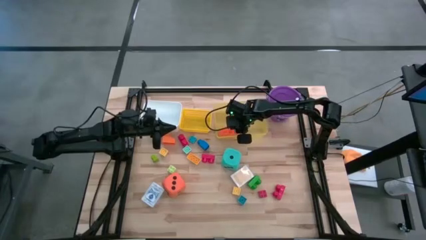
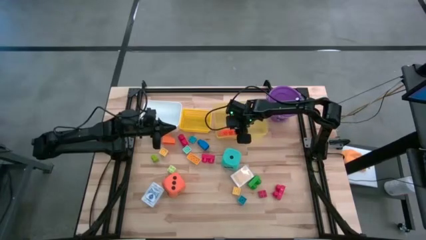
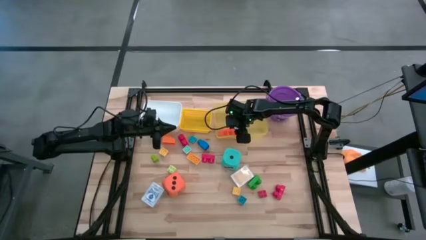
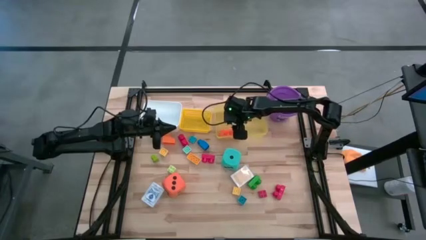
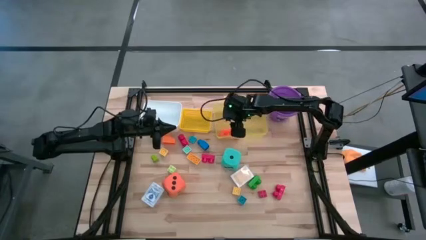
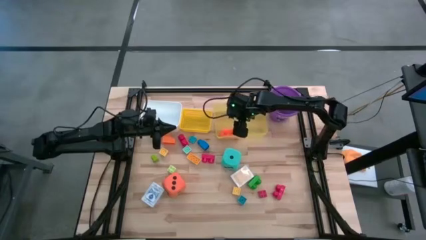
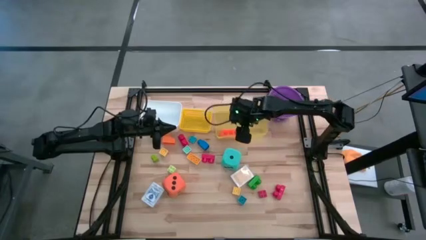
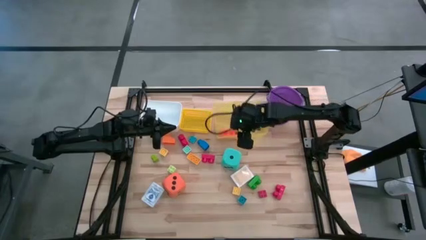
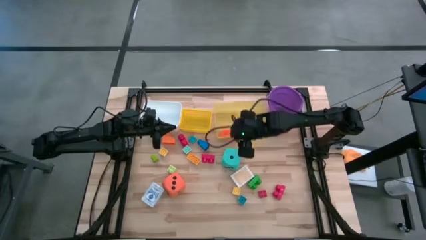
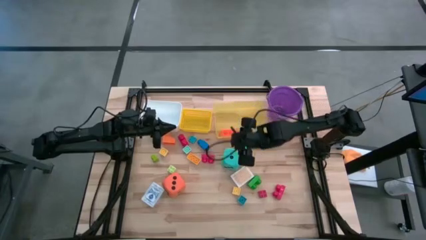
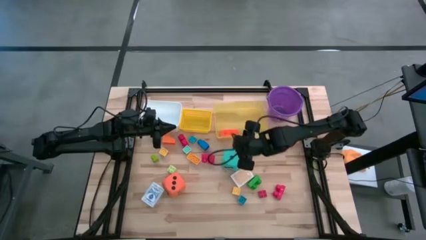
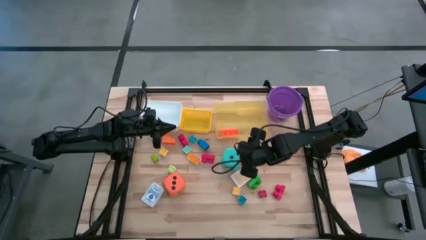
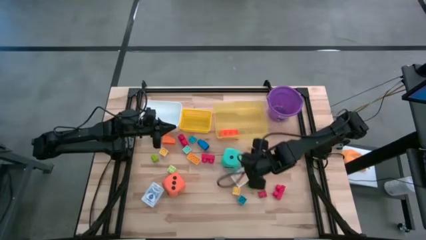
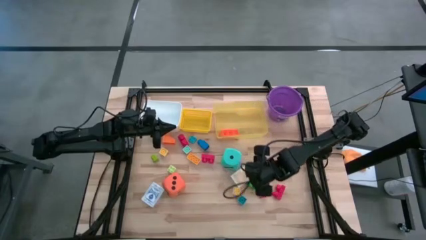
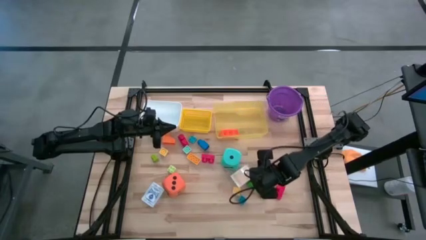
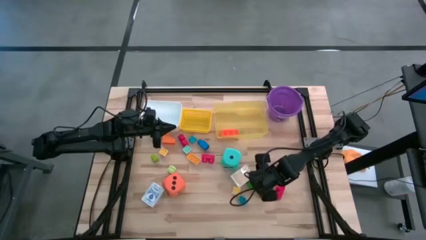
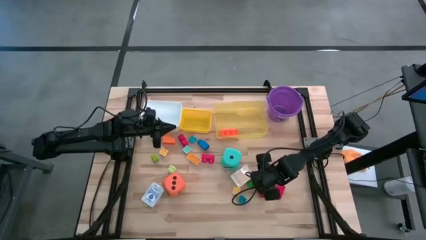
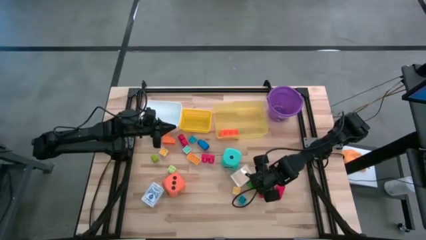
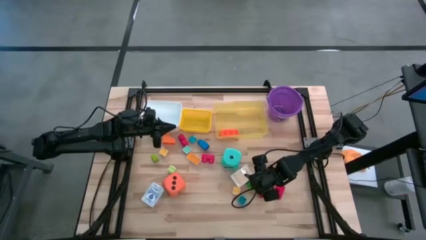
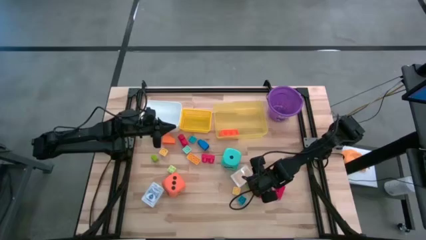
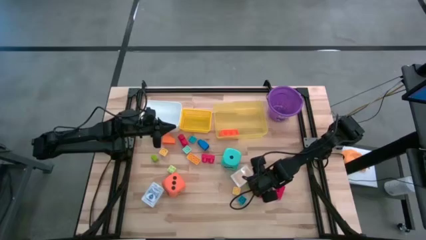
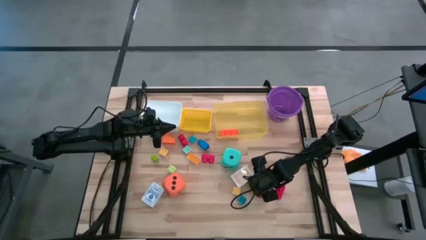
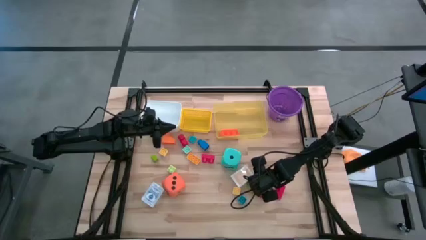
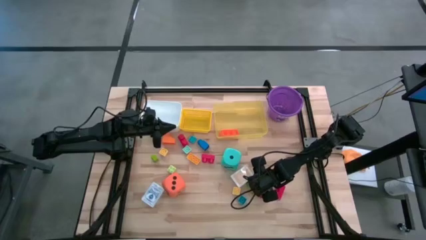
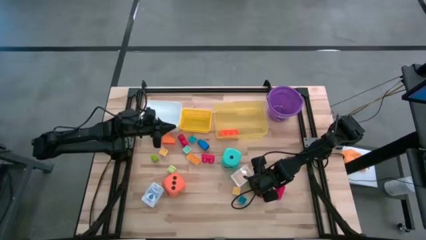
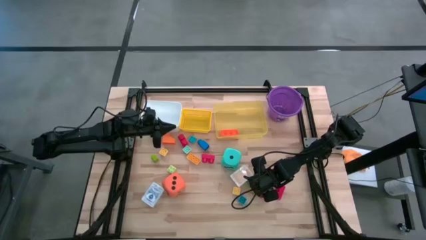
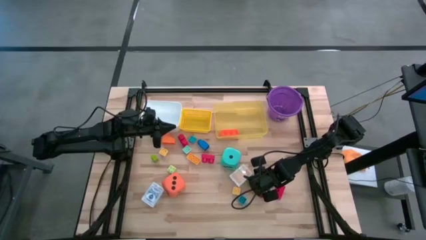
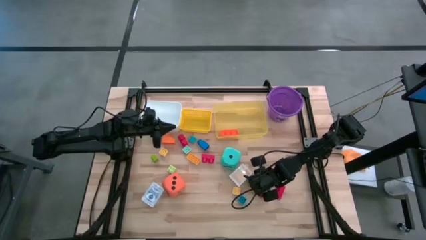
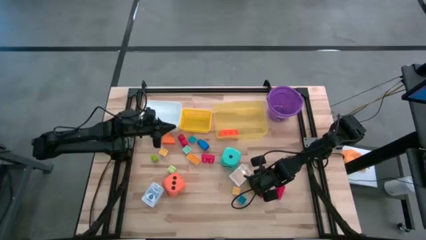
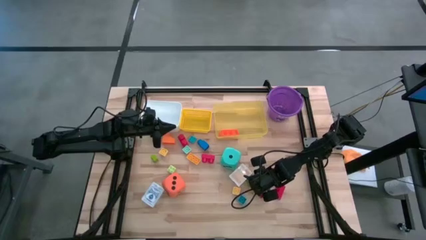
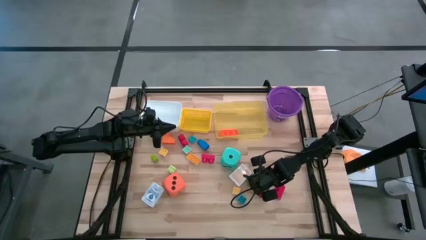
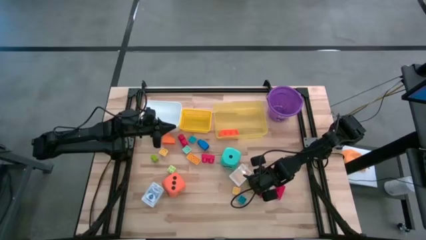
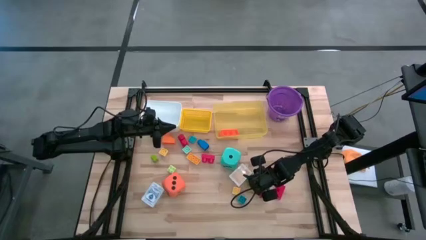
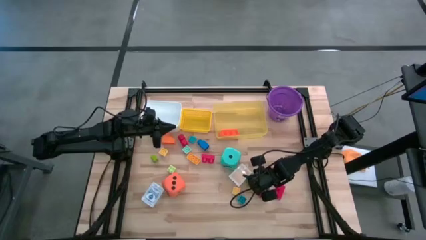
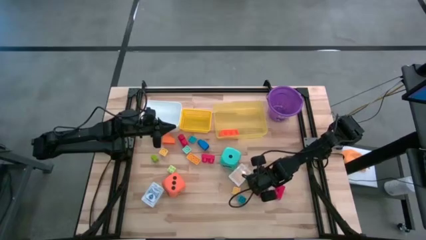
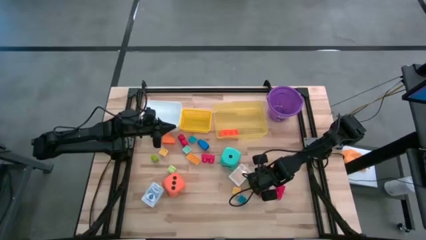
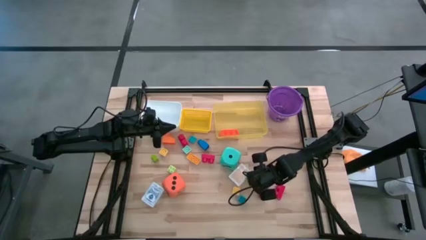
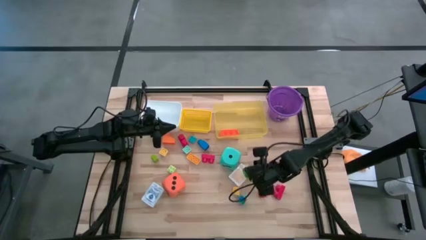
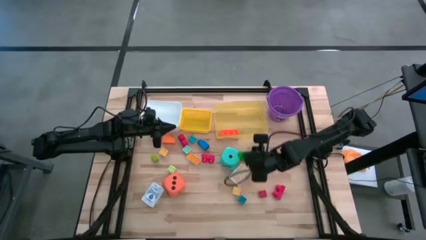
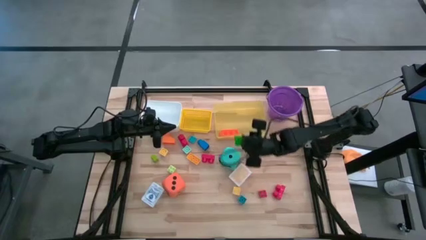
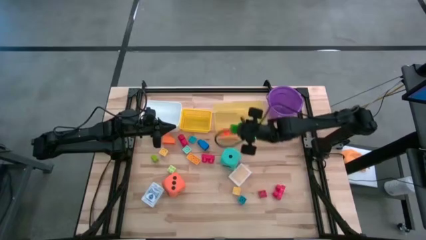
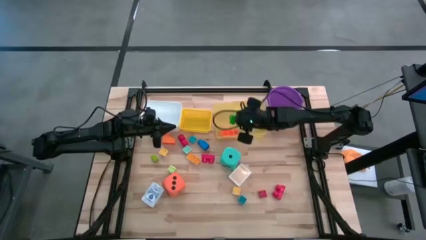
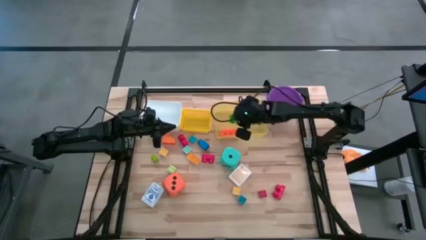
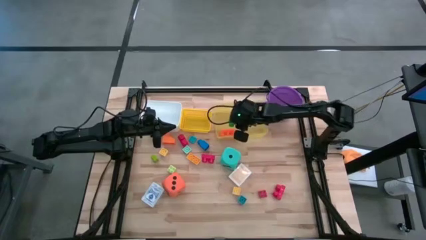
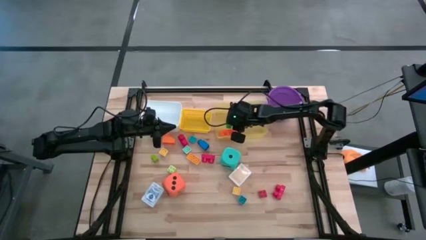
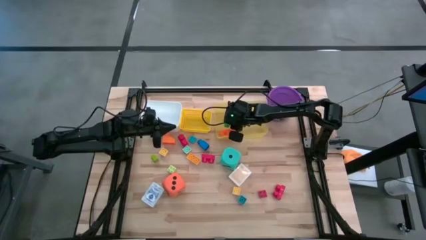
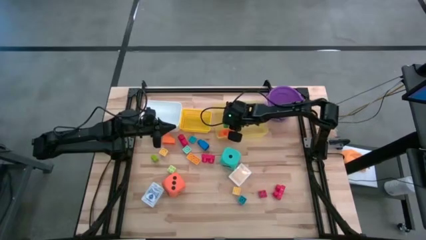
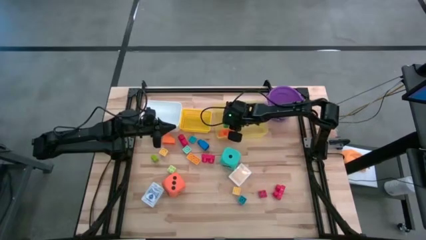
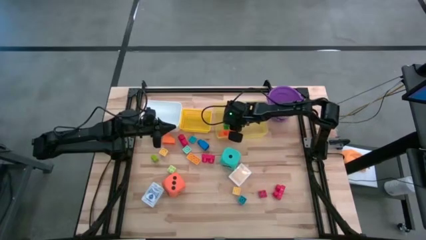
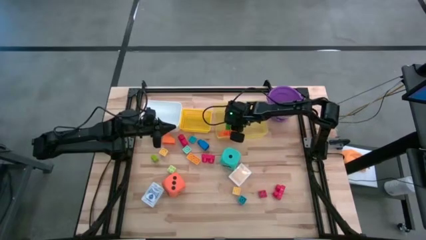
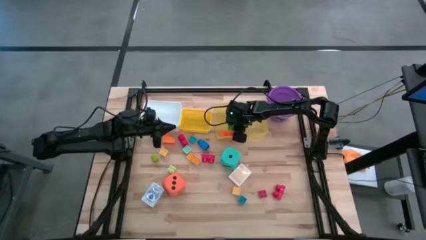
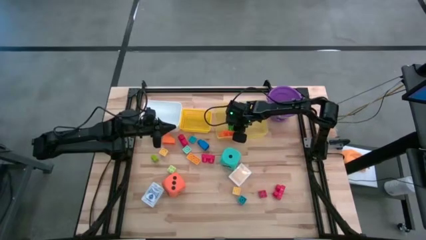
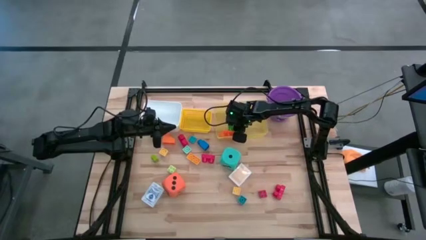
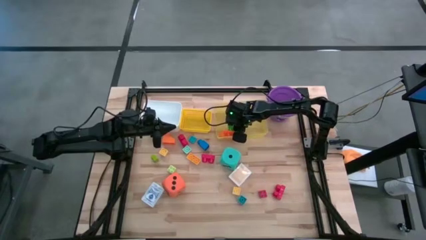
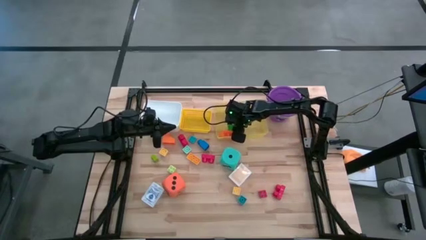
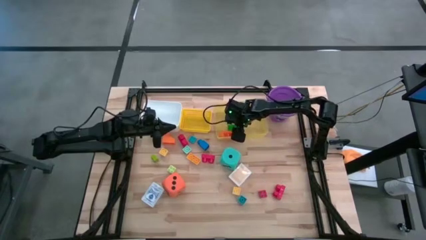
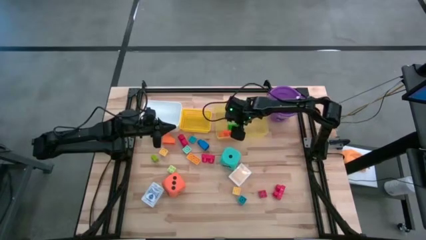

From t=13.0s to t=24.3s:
Task: Pick & Place Toys
Put the dark green game piece into the yellow bin

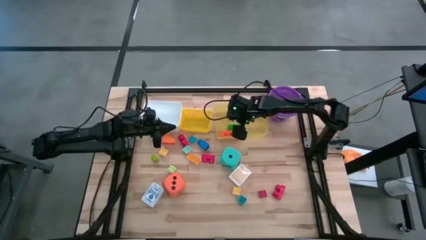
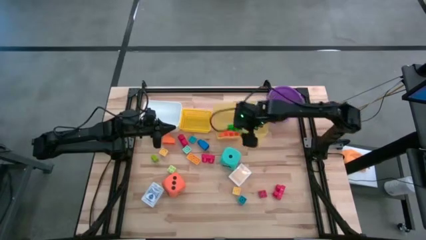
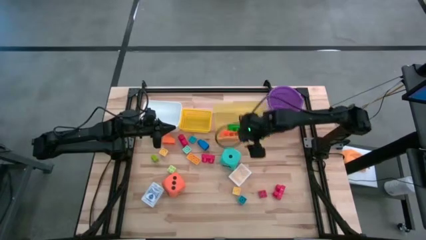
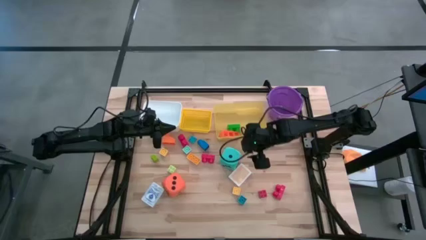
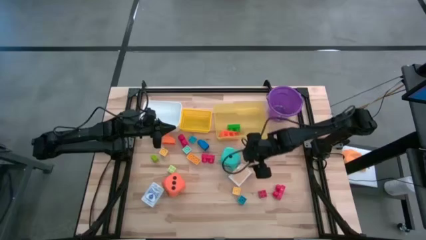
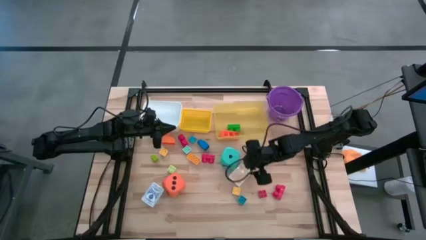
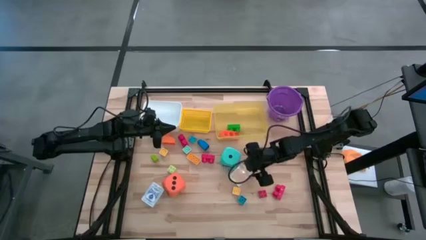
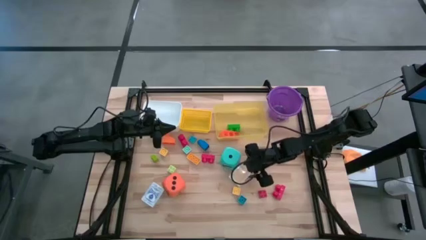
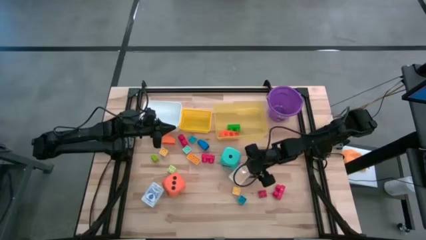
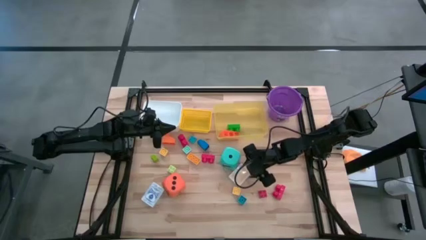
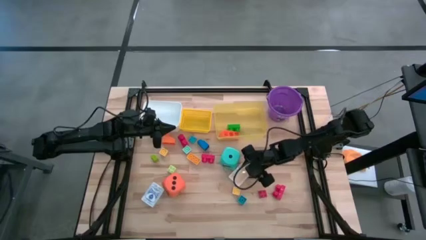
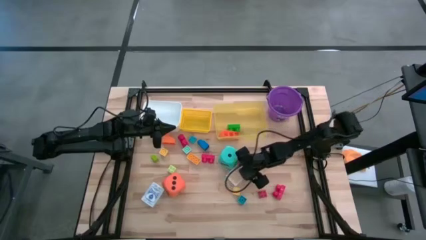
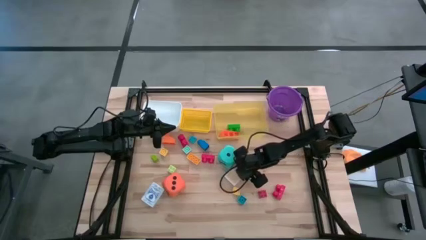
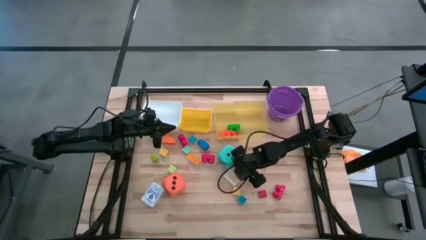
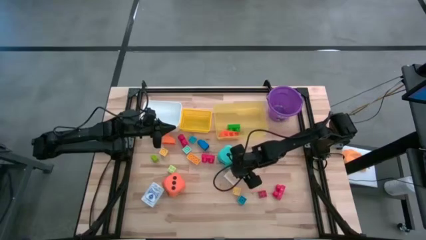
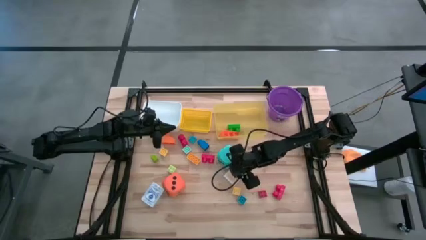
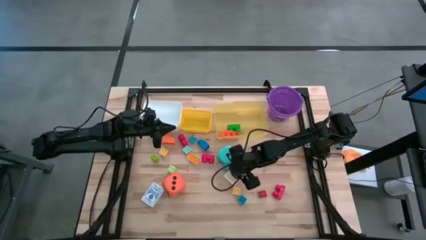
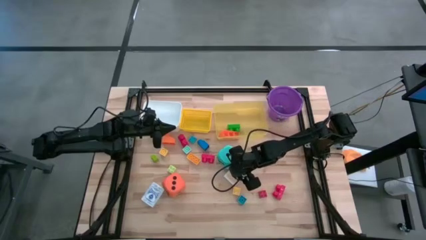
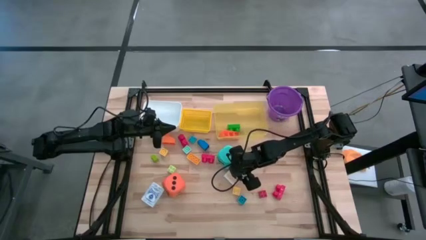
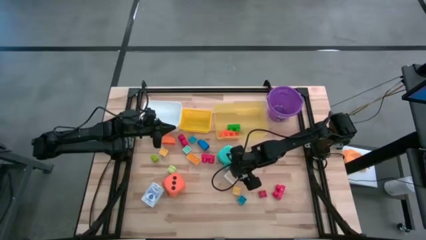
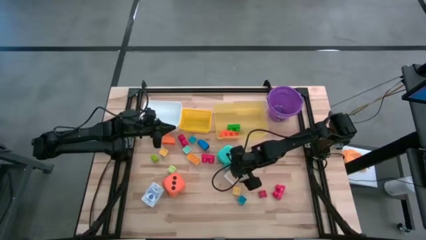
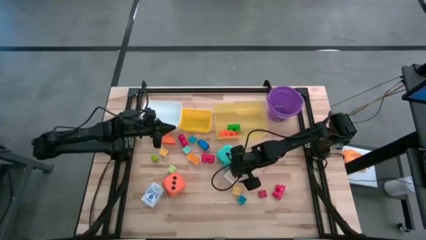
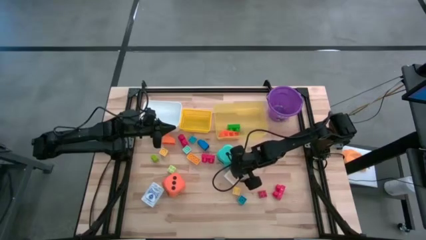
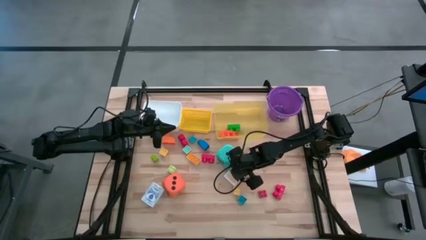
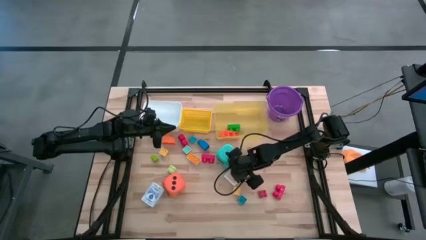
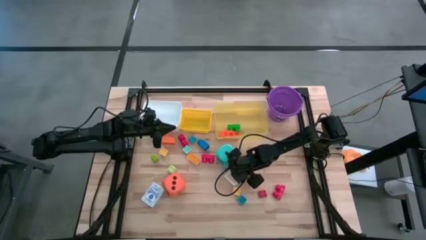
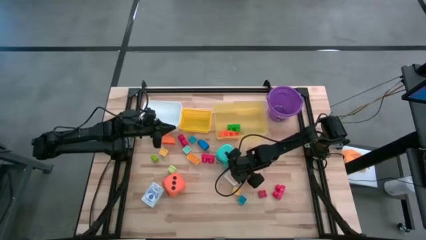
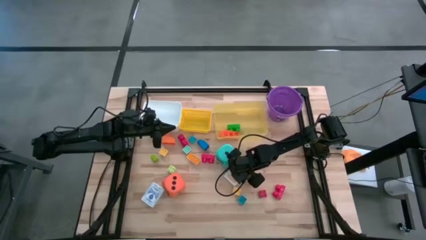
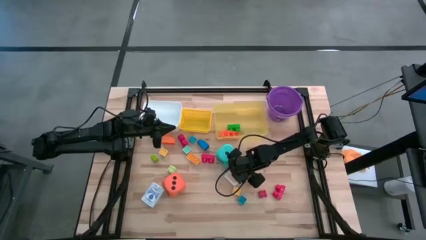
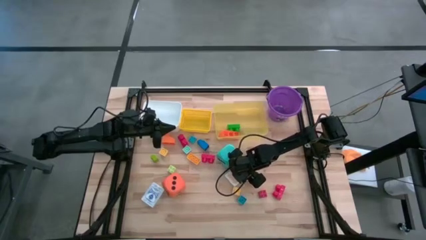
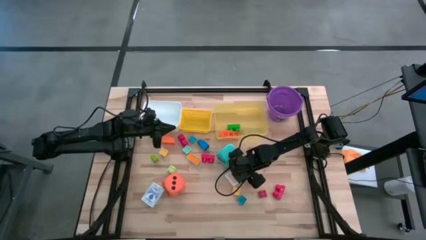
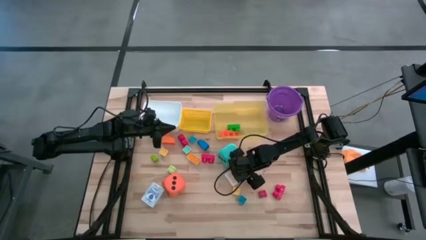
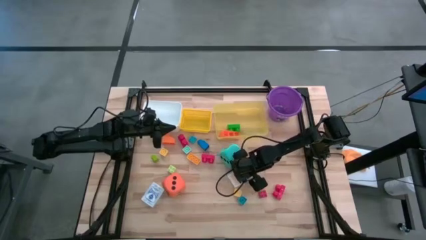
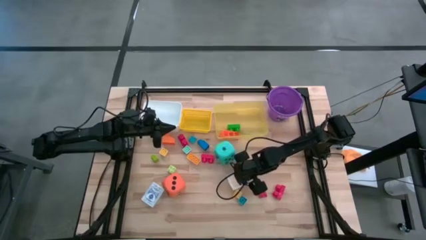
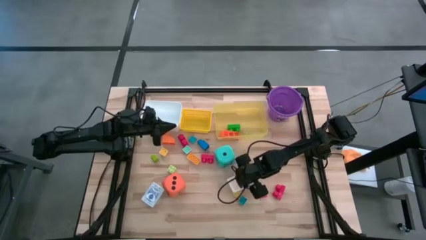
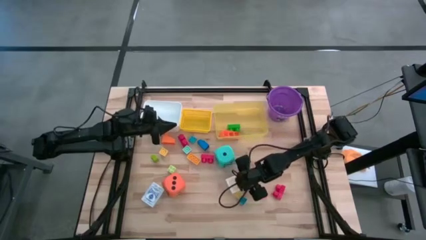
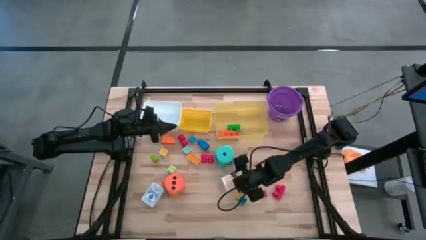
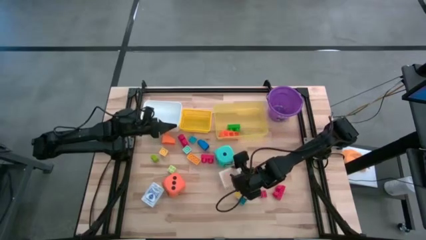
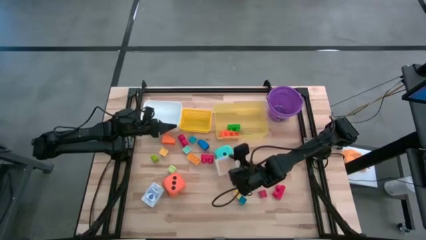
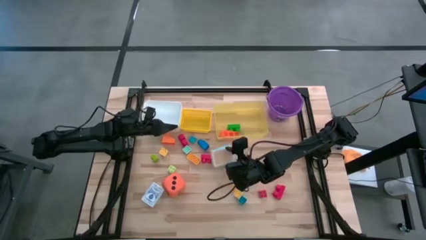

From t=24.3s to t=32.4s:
Put the yellow deck of cards into the yellow basket
